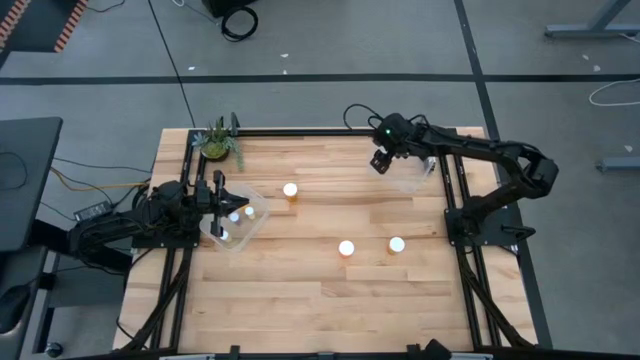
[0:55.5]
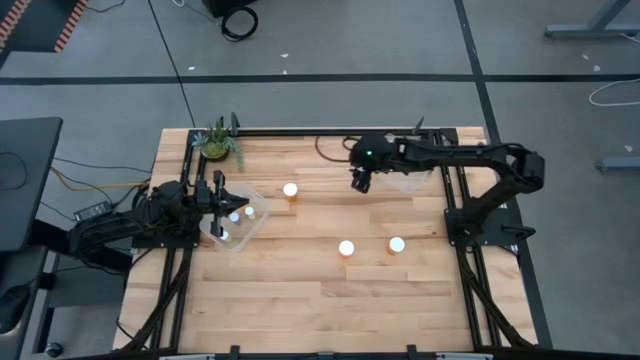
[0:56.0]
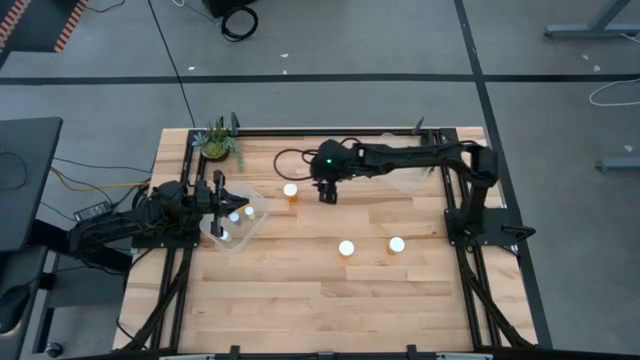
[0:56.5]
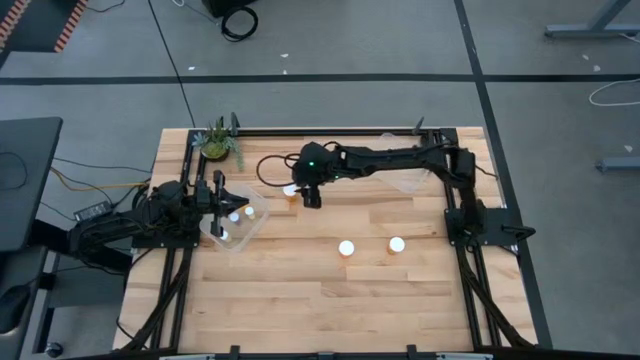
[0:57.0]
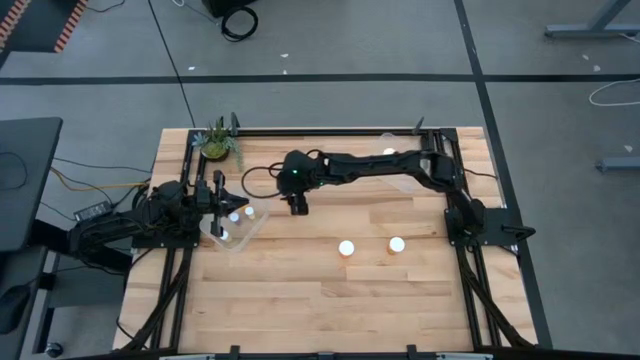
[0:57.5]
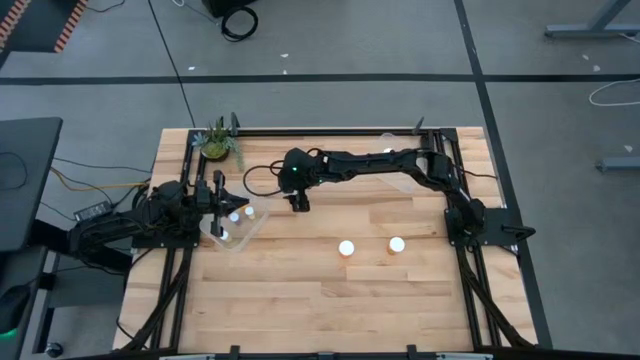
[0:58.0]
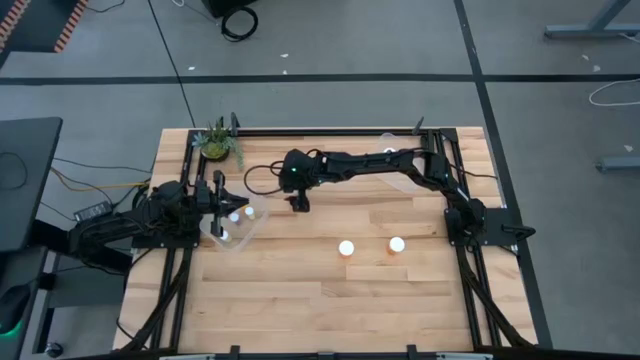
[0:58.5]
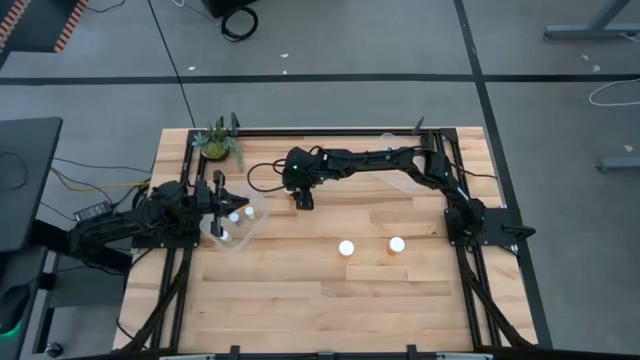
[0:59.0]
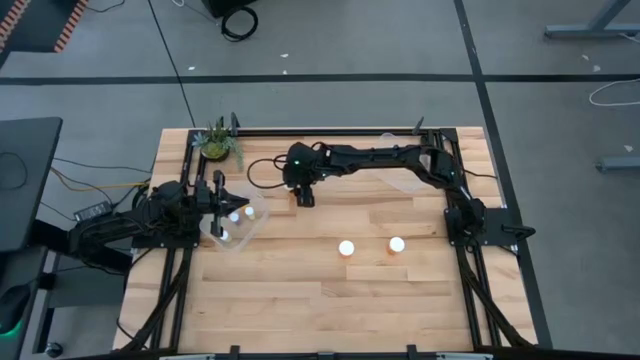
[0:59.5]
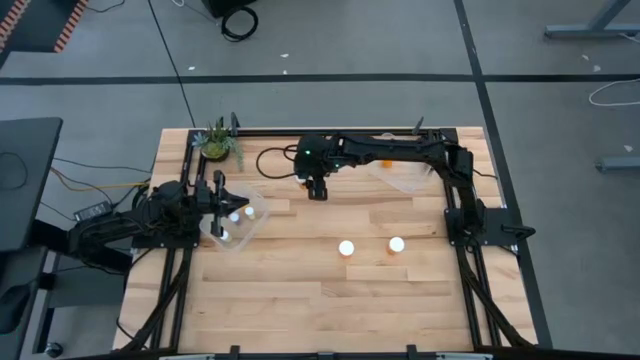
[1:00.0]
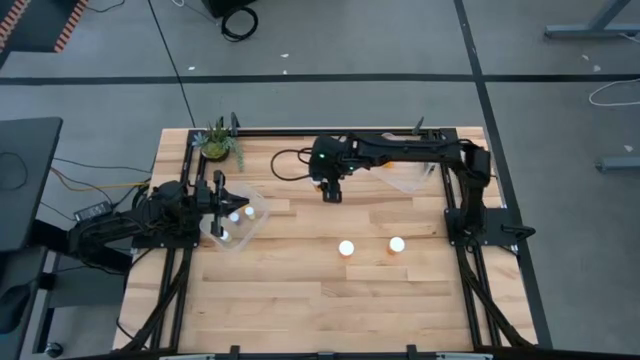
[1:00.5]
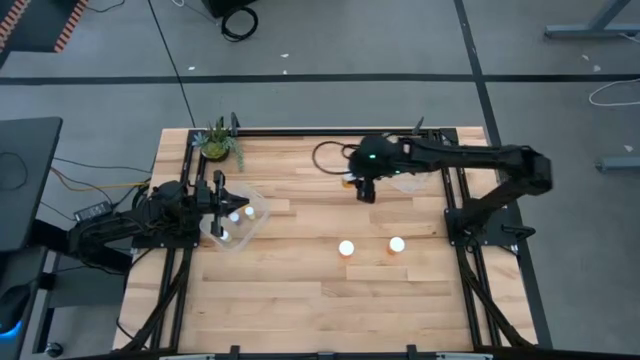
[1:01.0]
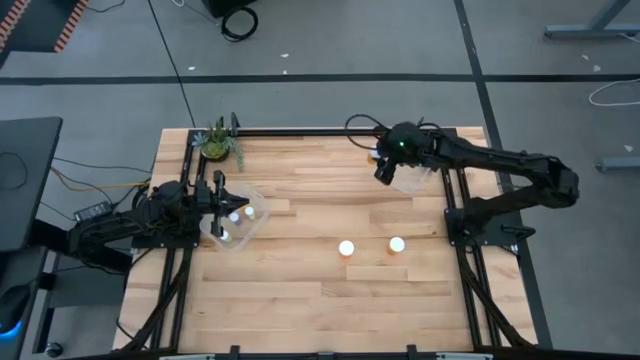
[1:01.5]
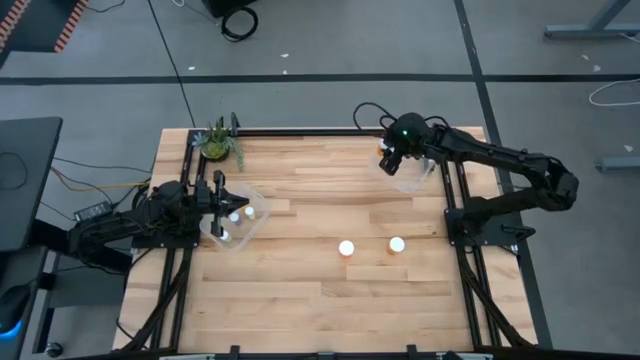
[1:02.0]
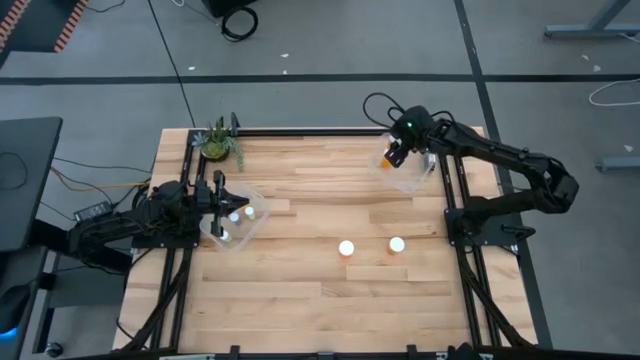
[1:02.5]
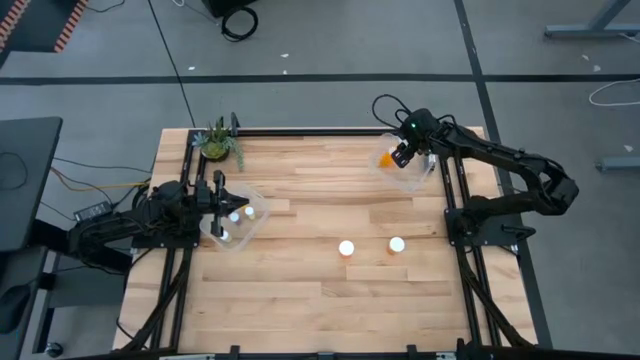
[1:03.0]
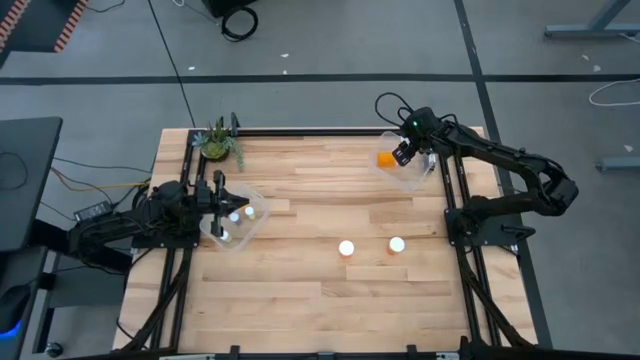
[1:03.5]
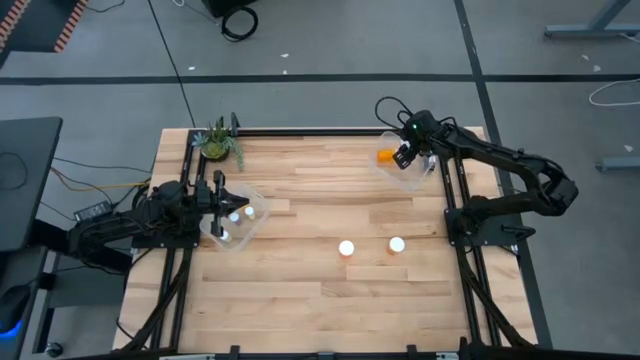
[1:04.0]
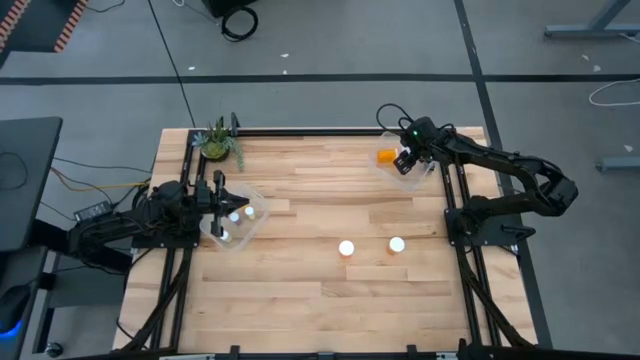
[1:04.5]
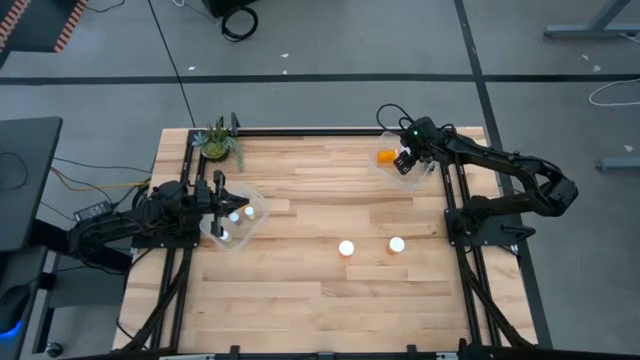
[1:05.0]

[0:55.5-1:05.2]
Task: Pick and place medicine bottles into bin by pill shape (circle, oval)
Put the large orange pill bottle into the right transparent bin

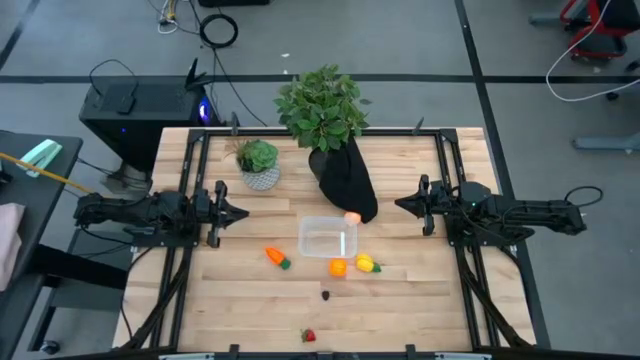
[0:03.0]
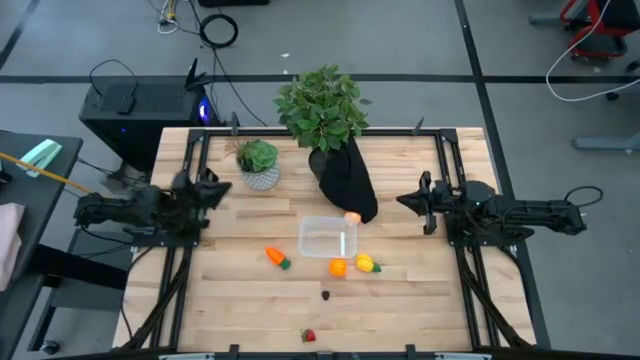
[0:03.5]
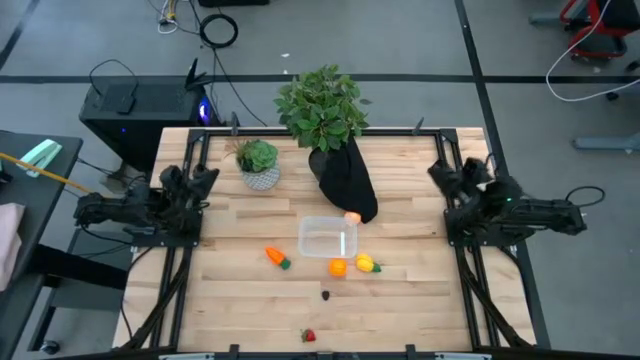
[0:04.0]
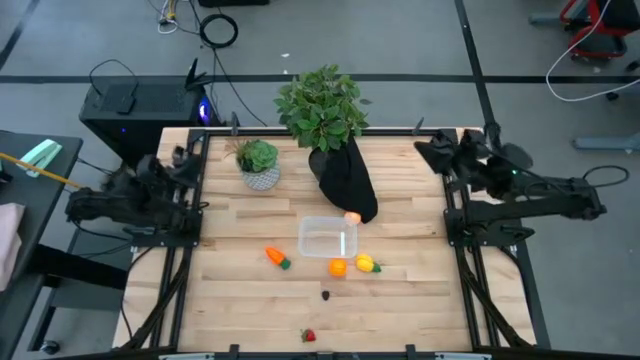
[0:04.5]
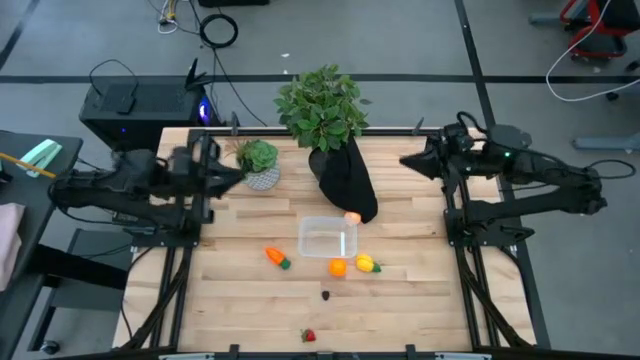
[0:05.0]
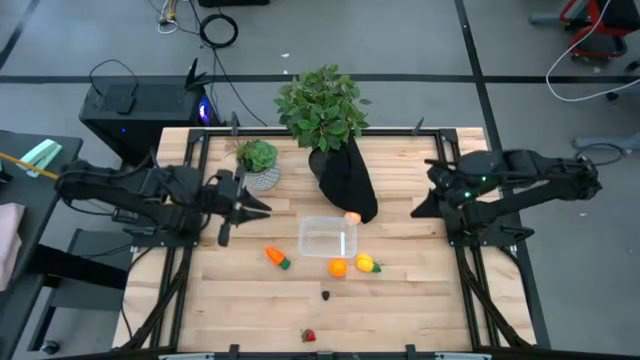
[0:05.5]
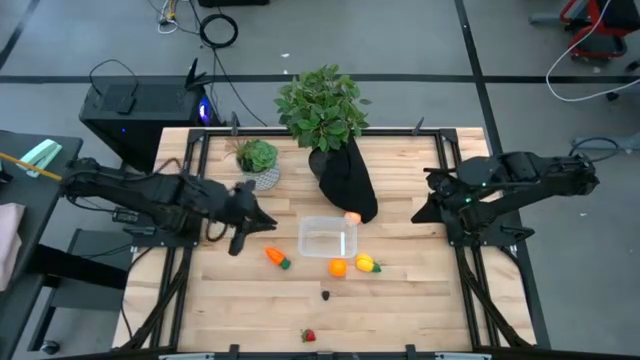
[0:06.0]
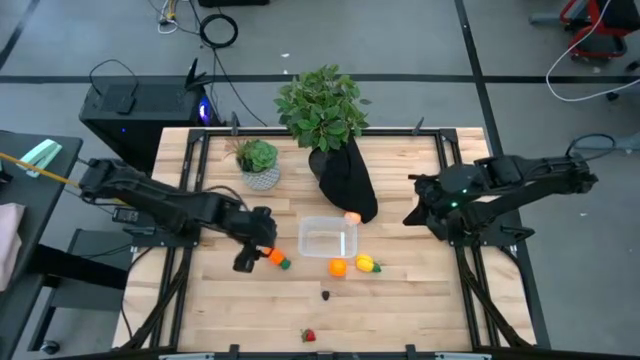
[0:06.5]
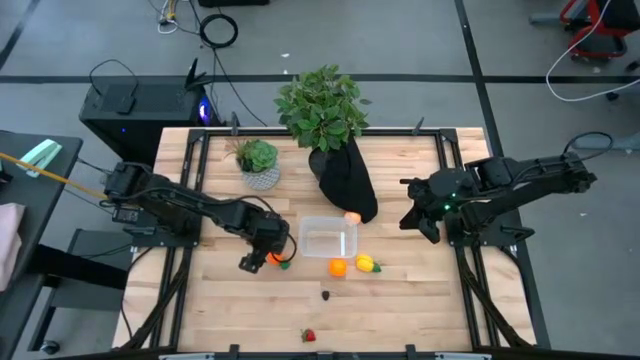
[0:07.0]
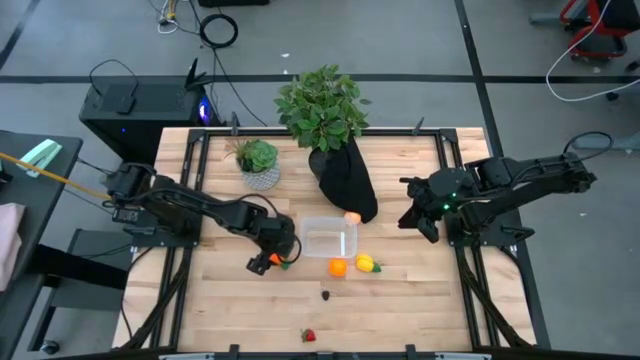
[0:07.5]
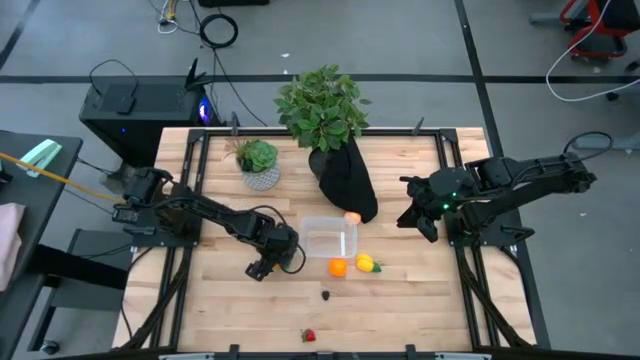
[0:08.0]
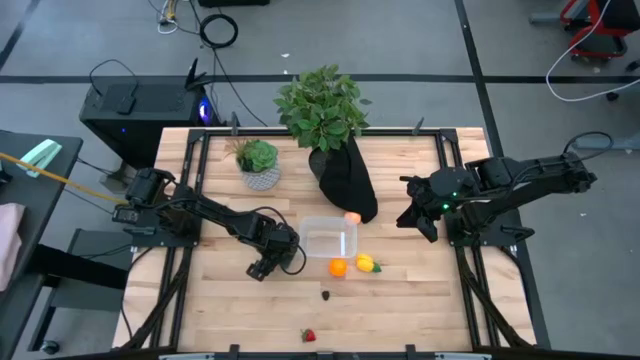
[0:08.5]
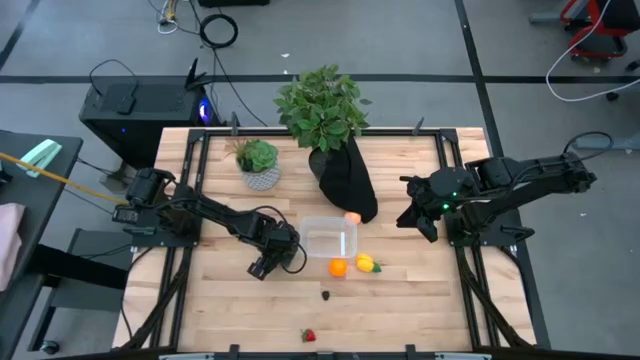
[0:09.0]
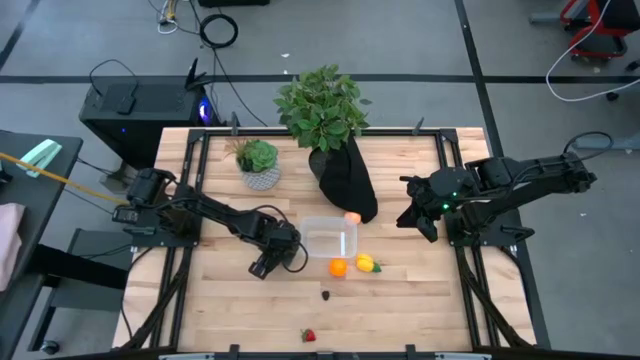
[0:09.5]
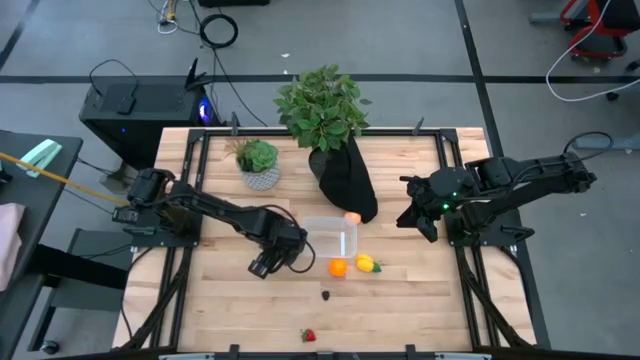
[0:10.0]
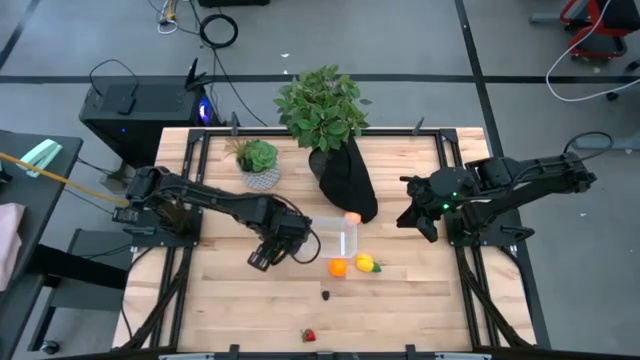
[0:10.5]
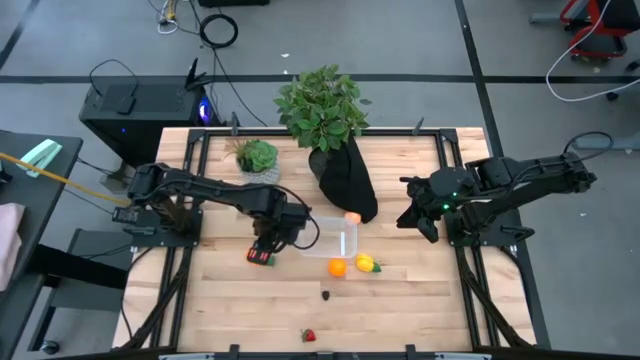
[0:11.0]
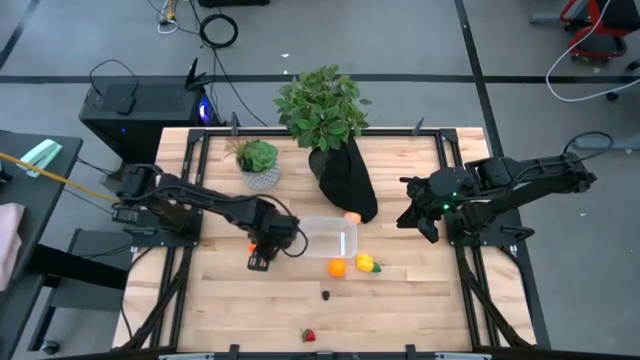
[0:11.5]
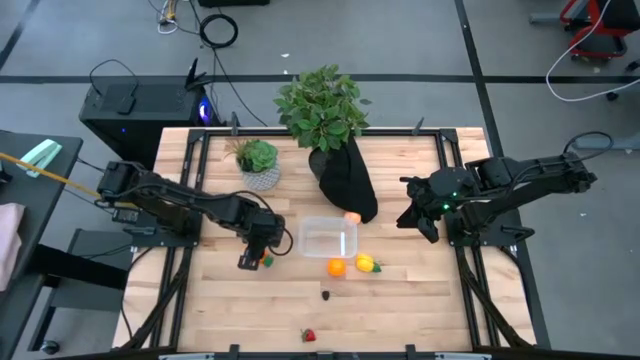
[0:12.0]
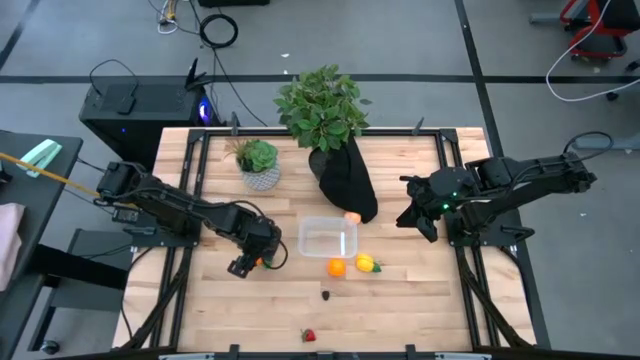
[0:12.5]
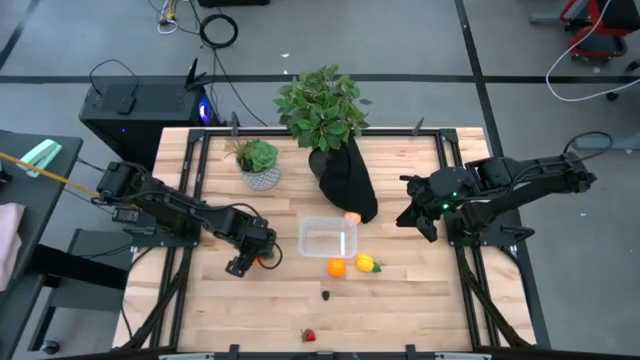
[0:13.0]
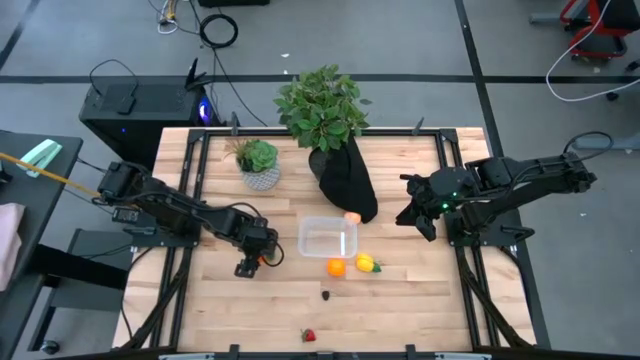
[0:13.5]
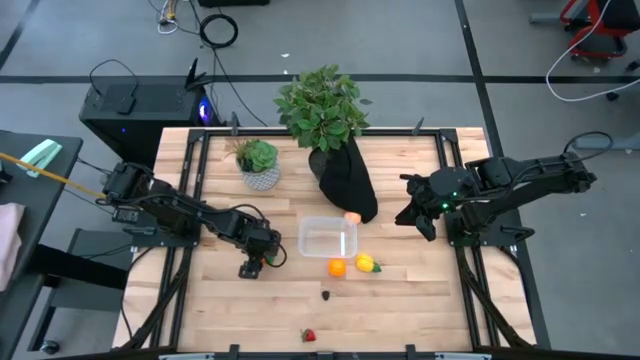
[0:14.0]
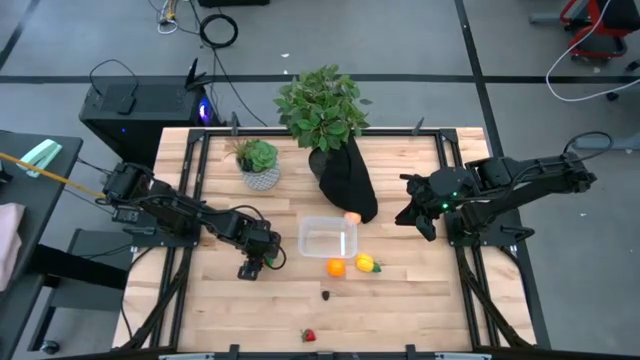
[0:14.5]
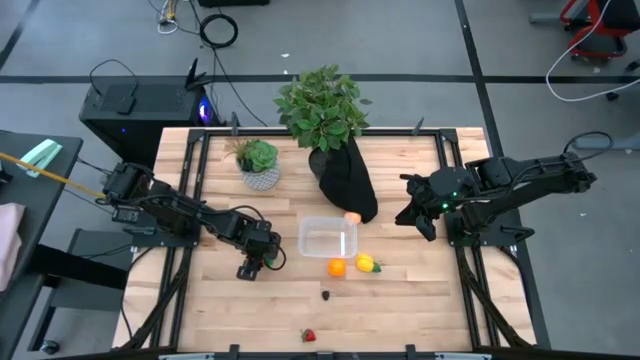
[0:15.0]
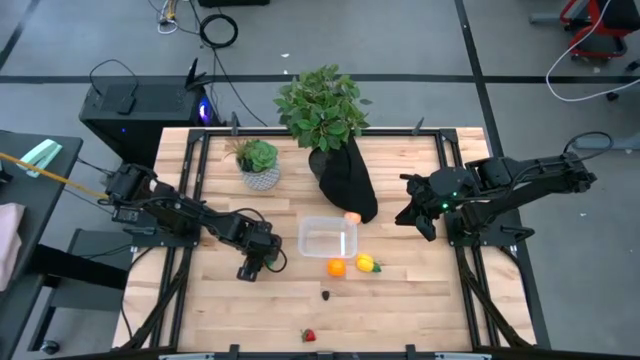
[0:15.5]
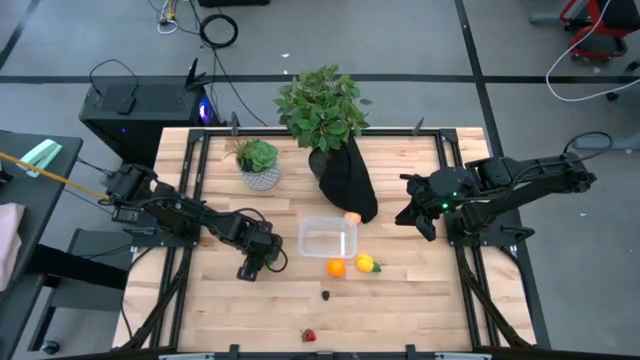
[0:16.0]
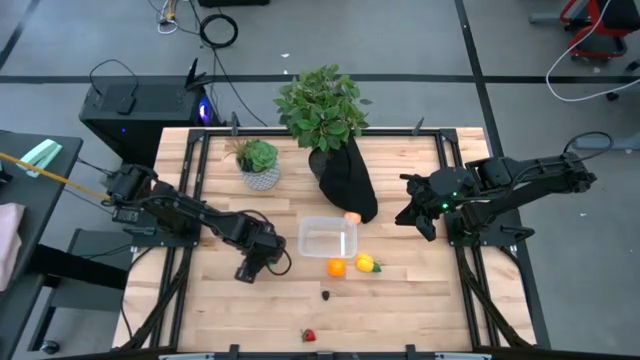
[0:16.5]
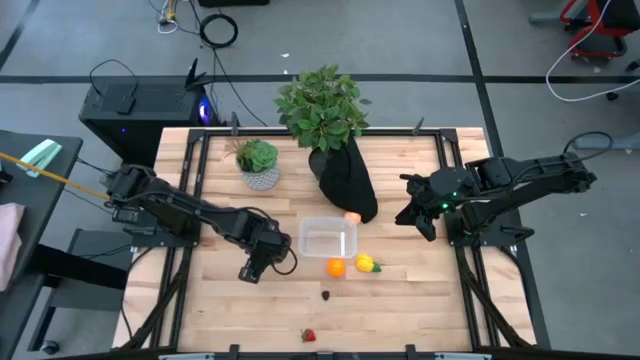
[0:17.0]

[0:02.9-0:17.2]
Task: Pick and placing Produce into tupperware
Put the orange carrot into the transparent bin
